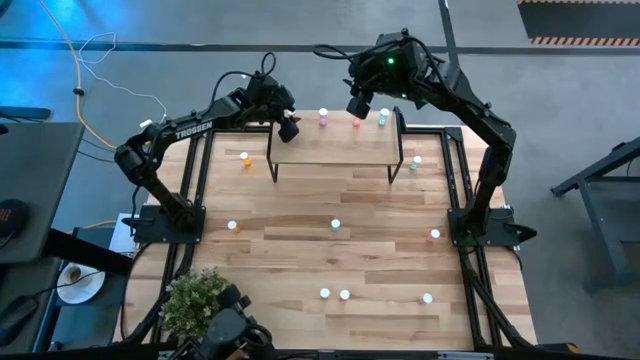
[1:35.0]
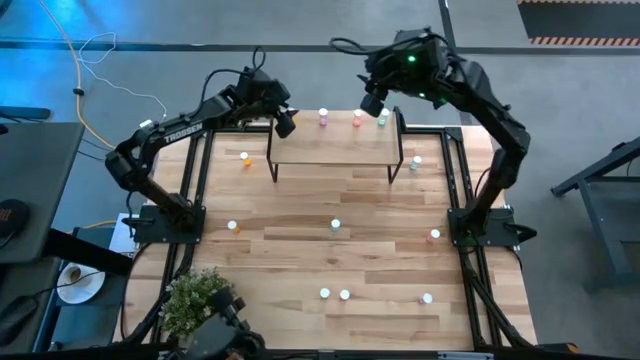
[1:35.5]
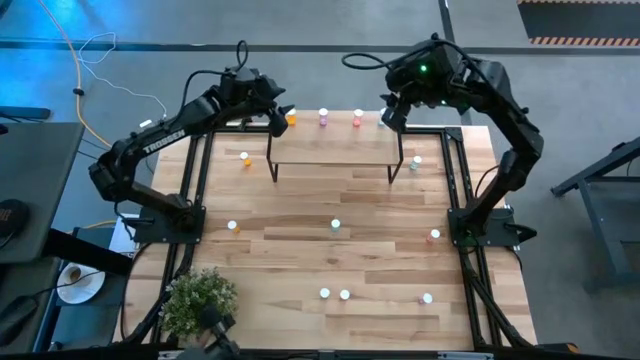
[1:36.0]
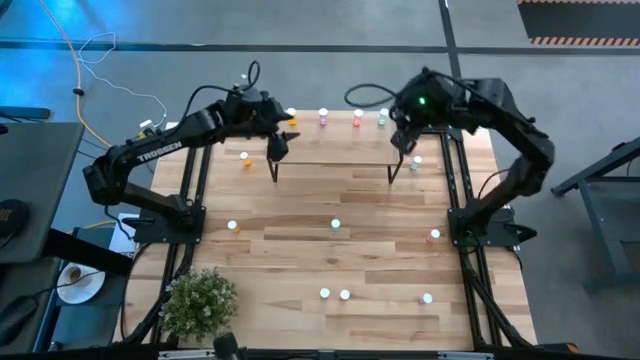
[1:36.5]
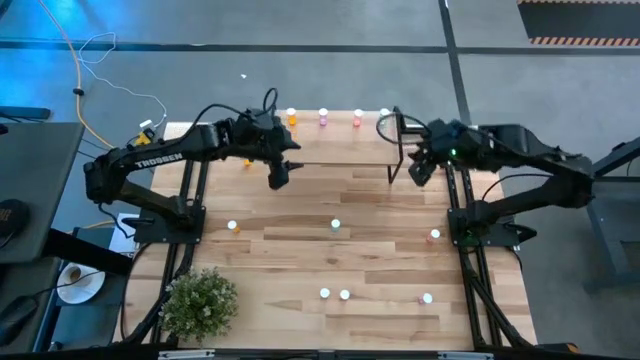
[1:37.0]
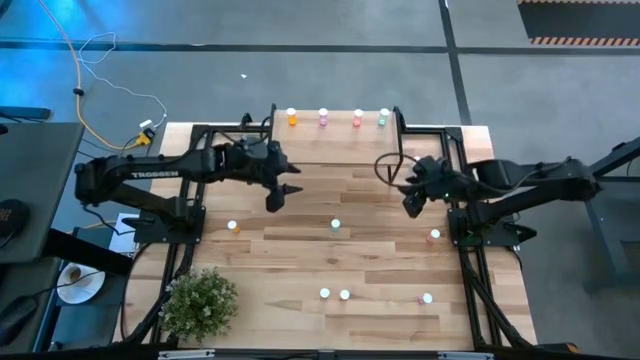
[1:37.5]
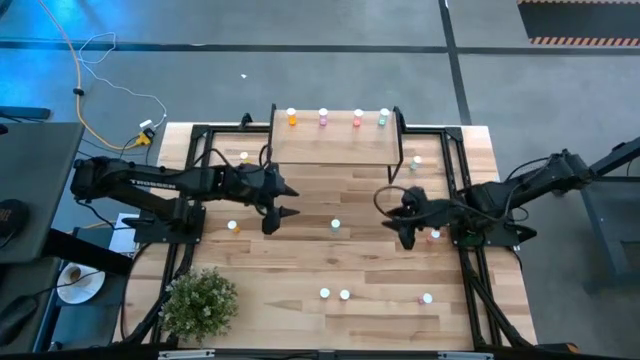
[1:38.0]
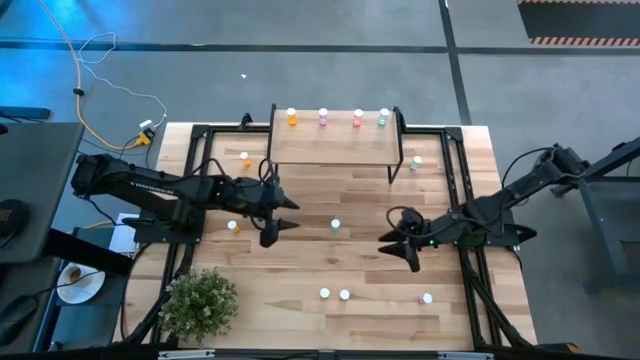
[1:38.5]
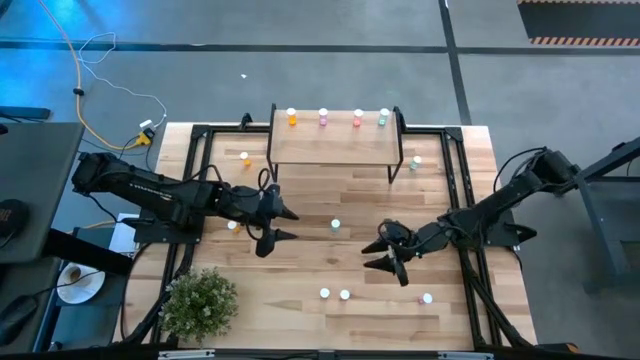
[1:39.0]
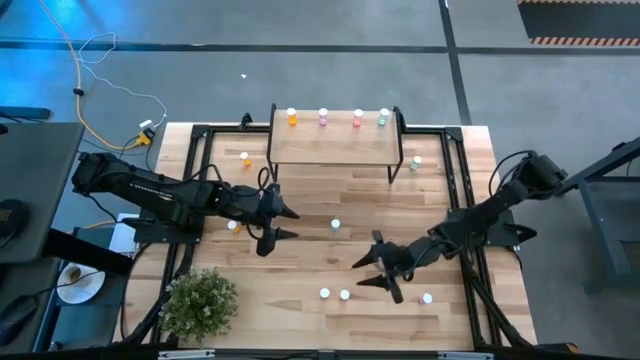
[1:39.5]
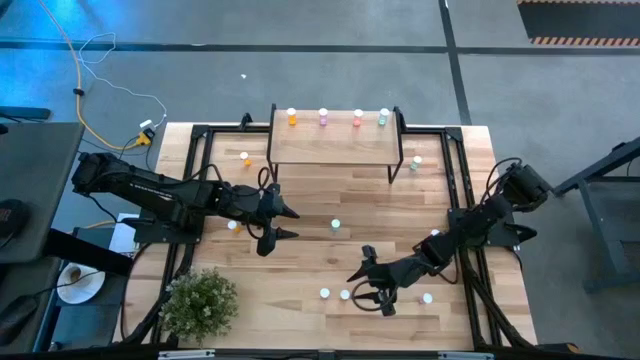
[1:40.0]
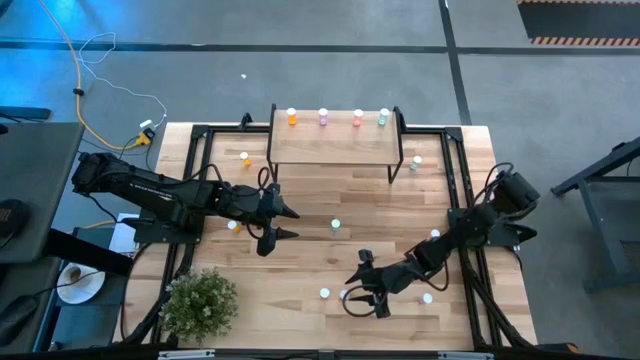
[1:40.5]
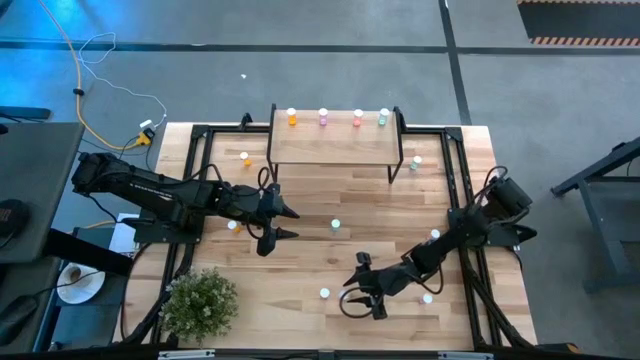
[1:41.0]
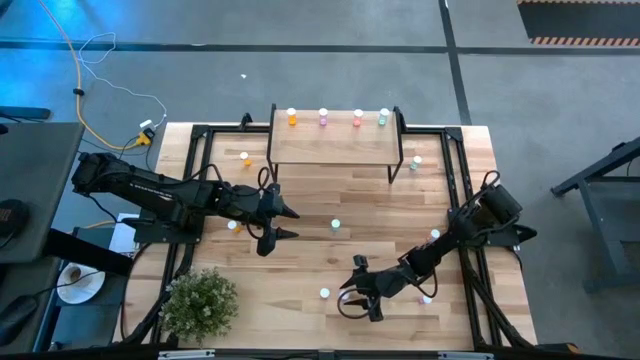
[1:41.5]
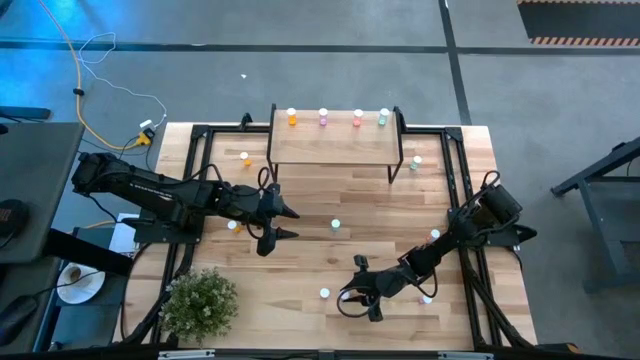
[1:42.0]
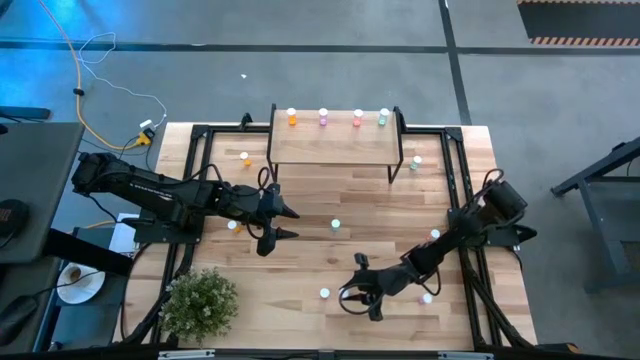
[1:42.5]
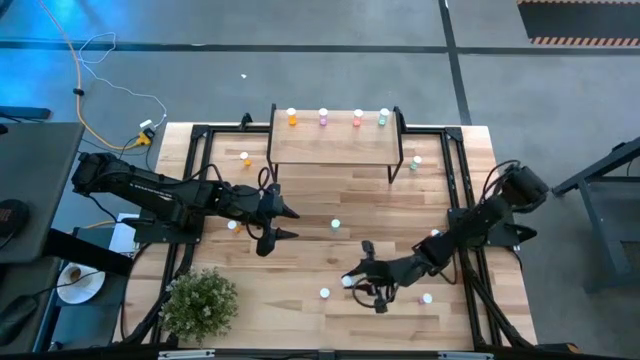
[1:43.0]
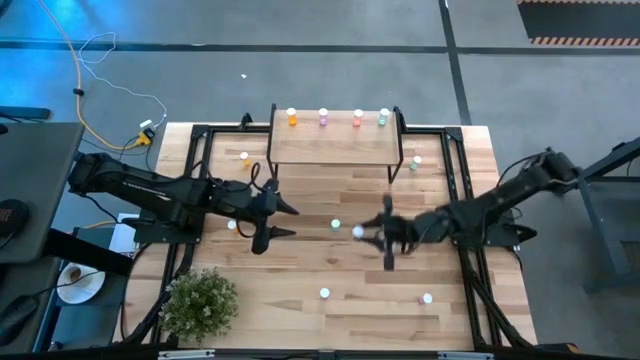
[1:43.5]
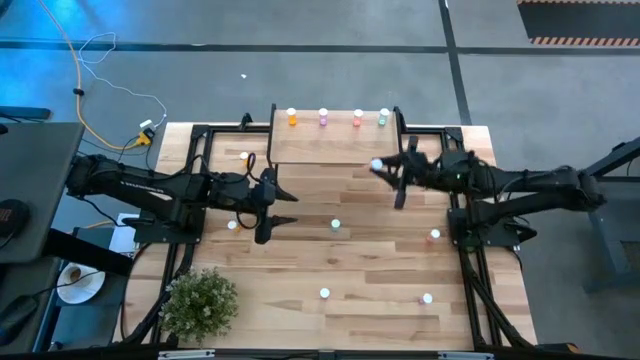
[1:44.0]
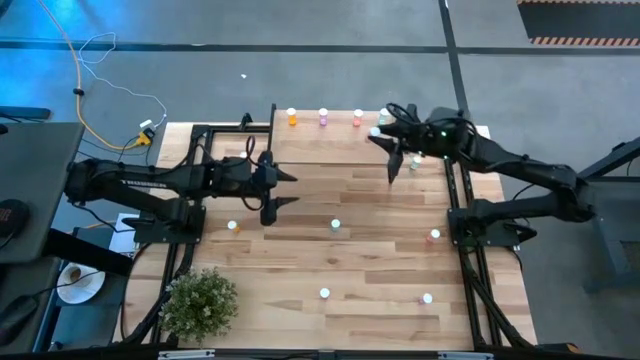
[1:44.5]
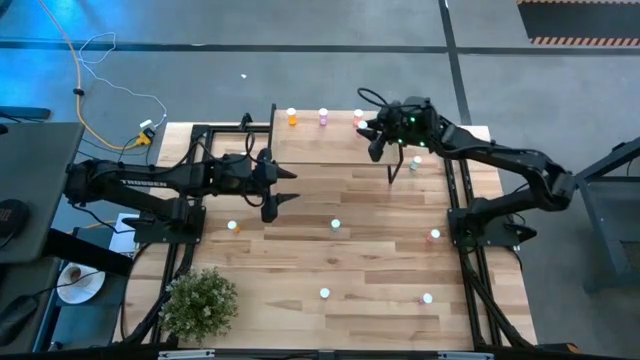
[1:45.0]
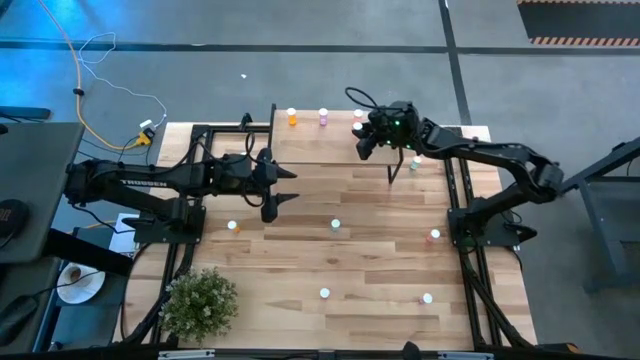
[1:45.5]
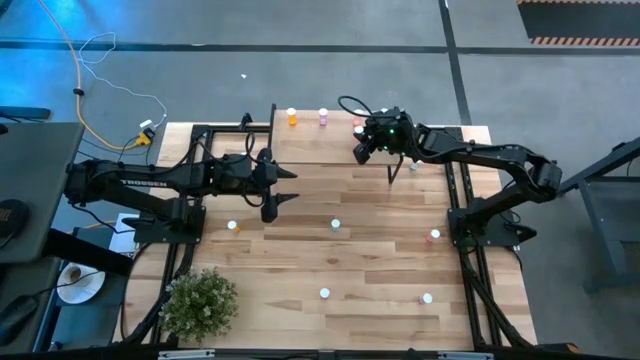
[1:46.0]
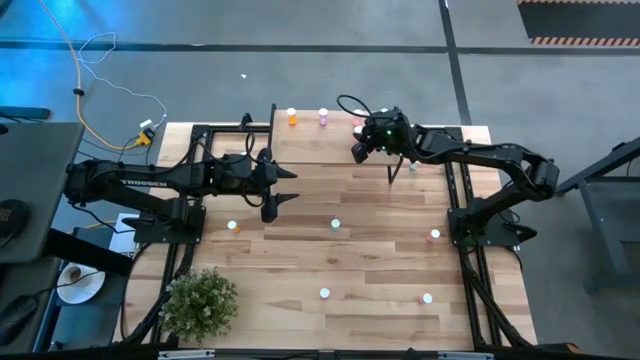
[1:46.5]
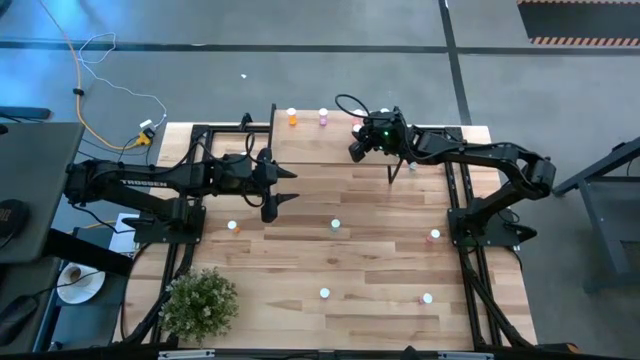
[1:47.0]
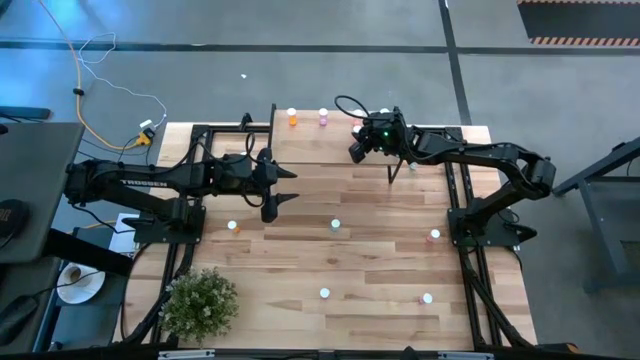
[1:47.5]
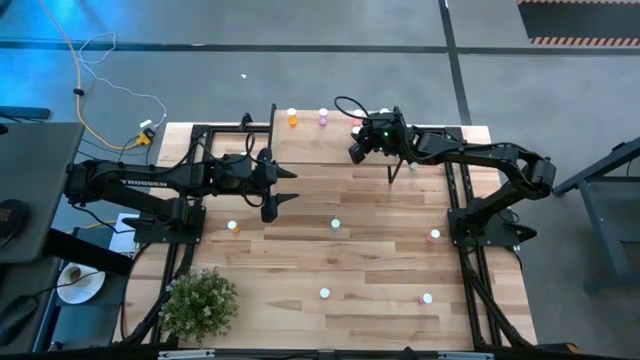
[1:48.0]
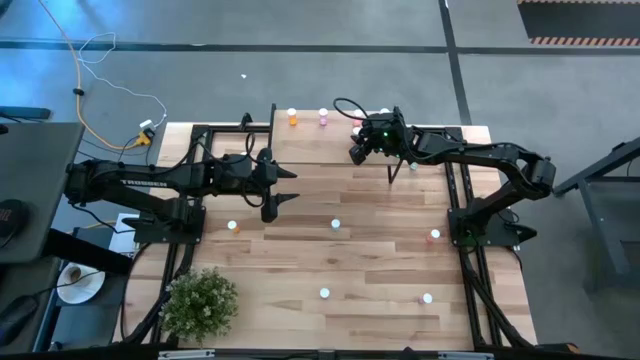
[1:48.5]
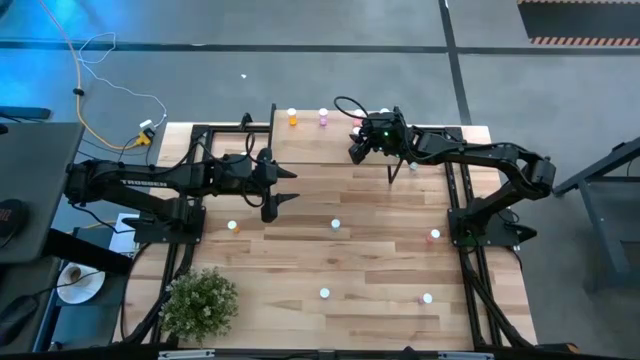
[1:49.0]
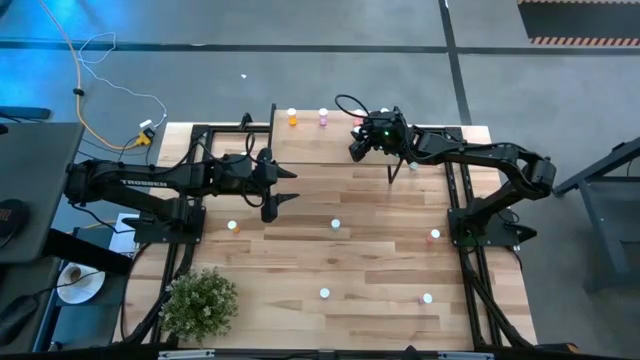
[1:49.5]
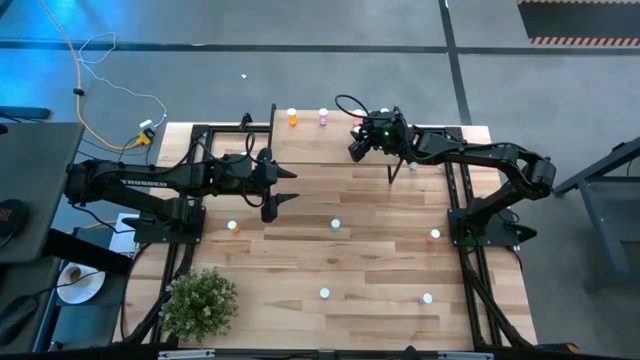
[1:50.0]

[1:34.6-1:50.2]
Task: Pick and place medicine bottles onto shelf by color
Put the bottom red pill bottle on the shelf aligned with the other red pill bottle

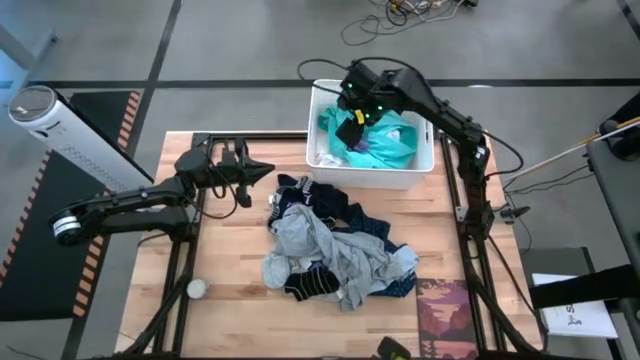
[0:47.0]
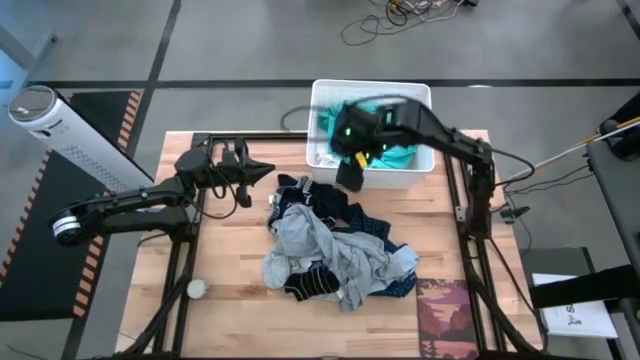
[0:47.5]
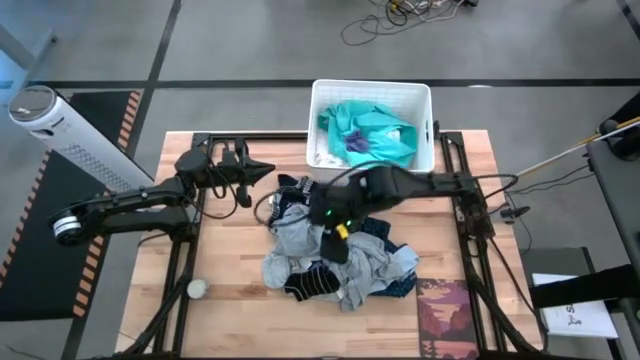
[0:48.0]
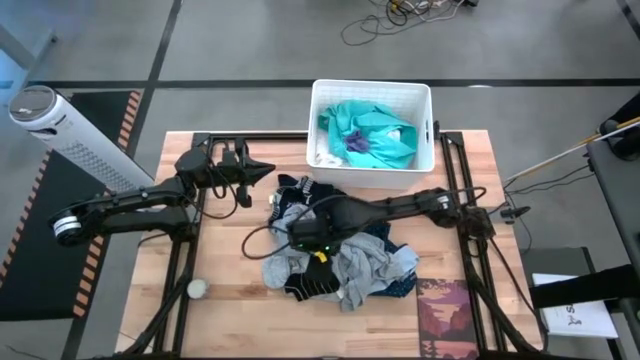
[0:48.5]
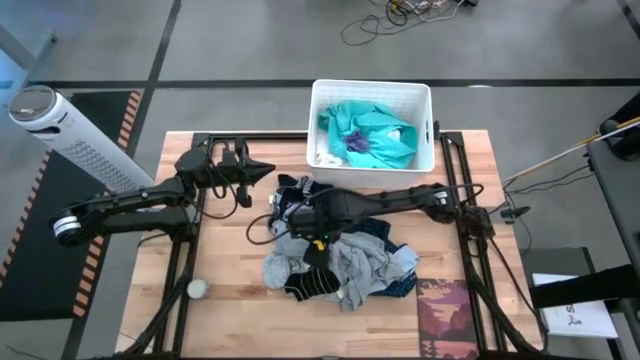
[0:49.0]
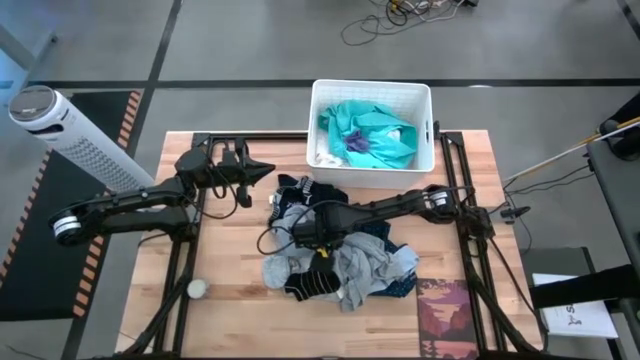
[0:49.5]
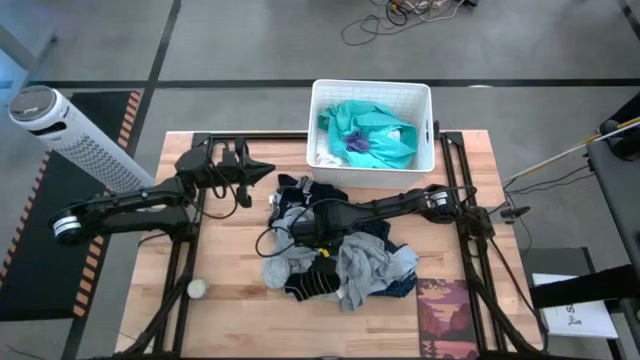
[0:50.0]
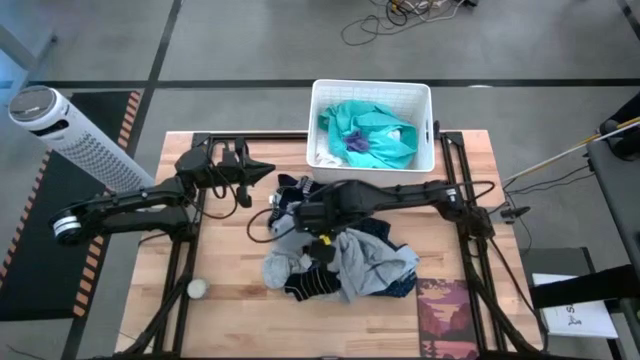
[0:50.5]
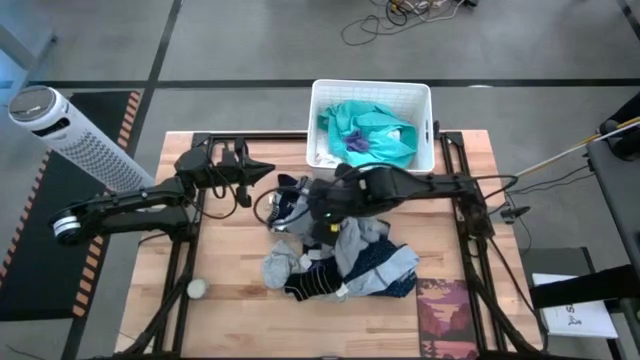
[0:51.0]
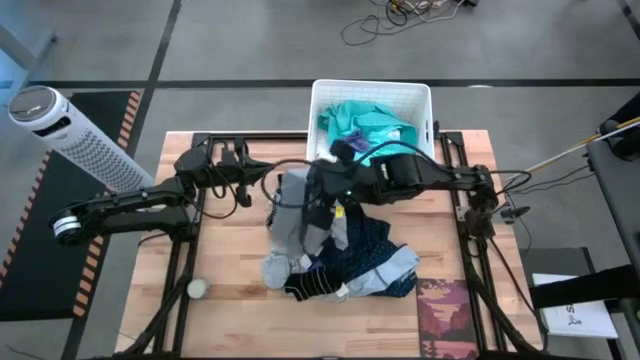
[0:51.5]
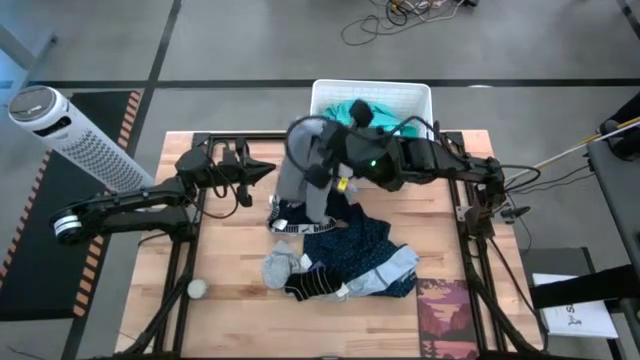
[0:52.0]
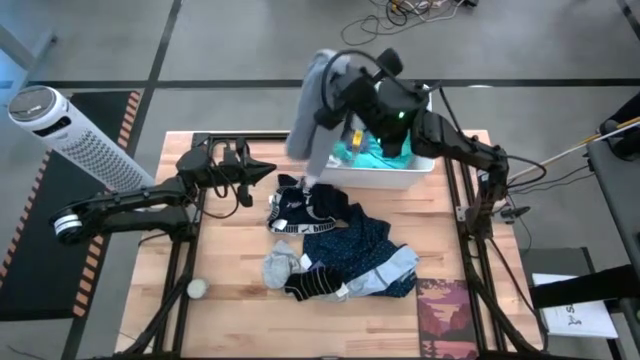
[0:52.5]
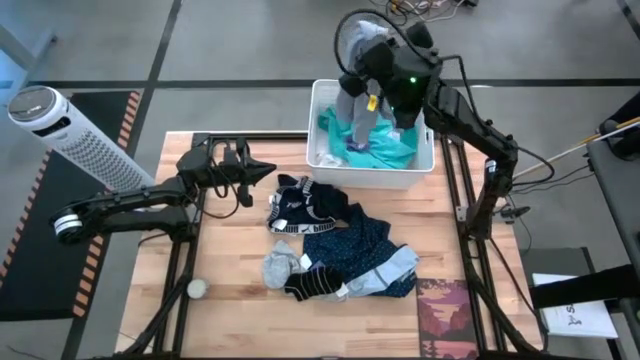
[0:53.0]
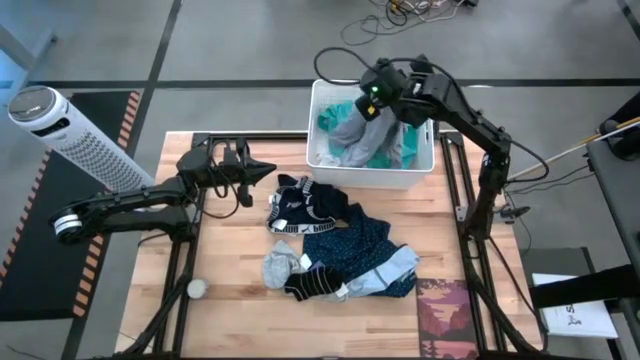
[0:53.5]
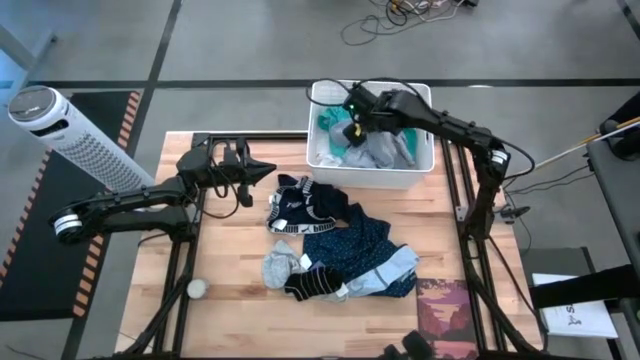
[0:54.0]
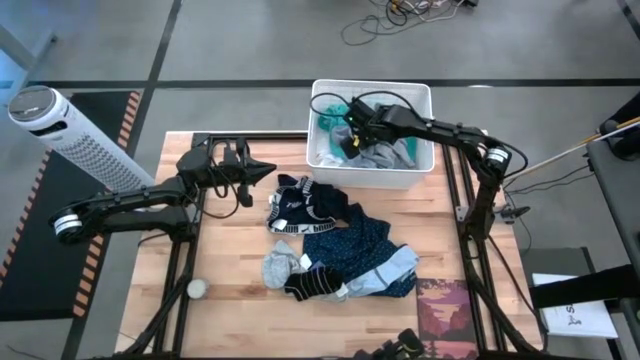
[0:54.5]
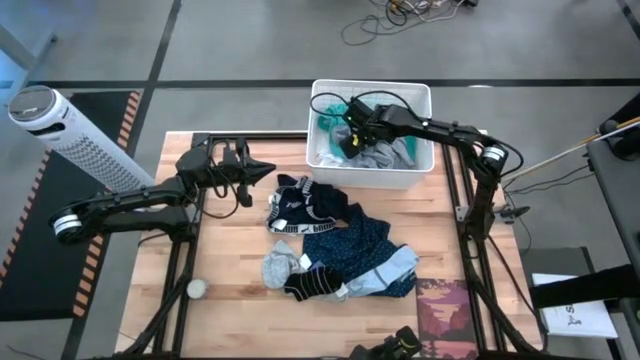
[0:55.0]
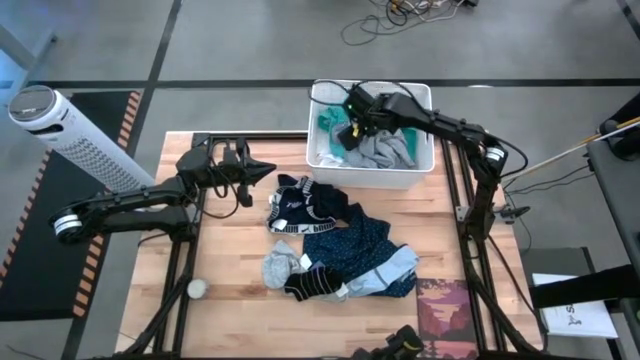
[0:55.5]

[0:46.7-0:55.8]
Task: Sort clothes
Put the gray shirt into the white laundry bin
